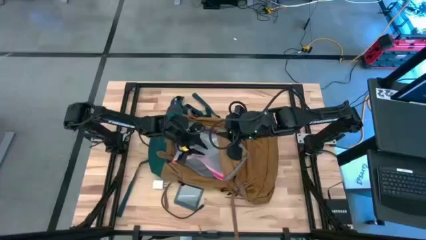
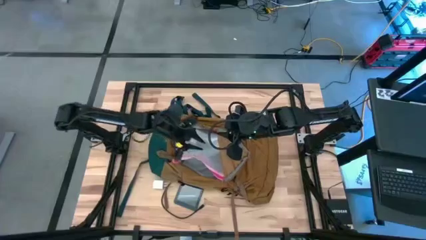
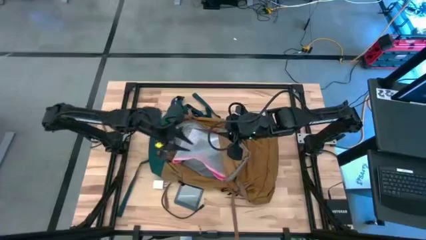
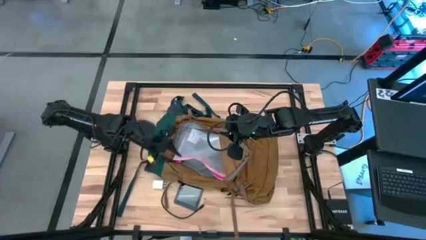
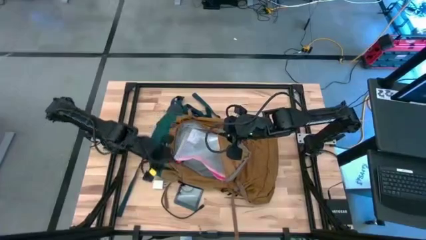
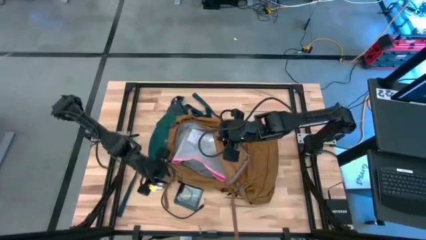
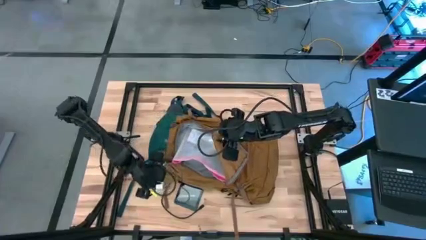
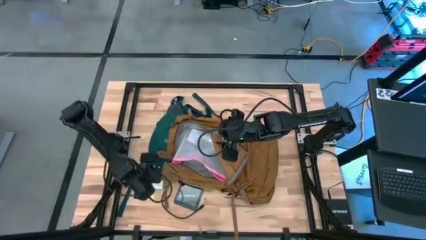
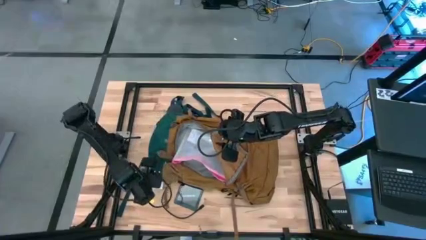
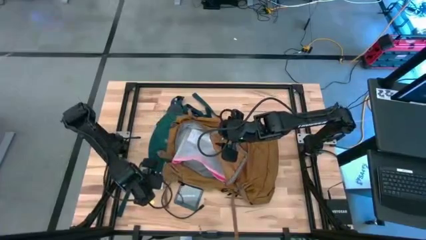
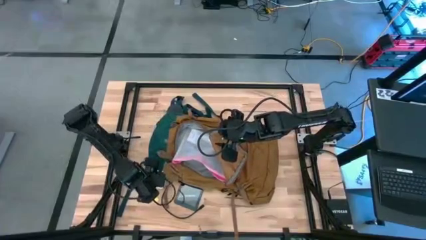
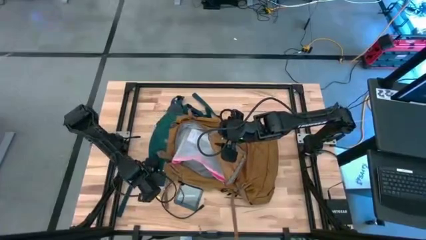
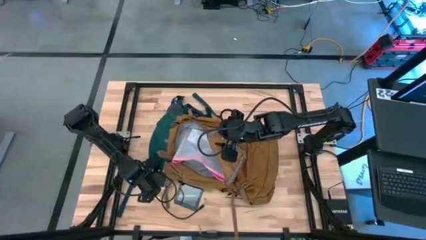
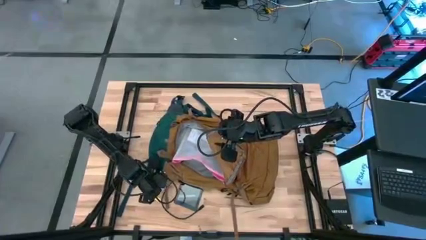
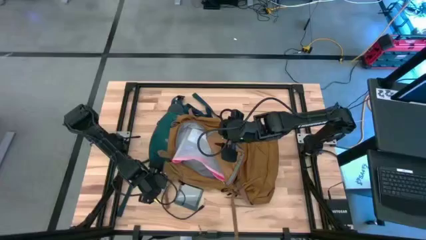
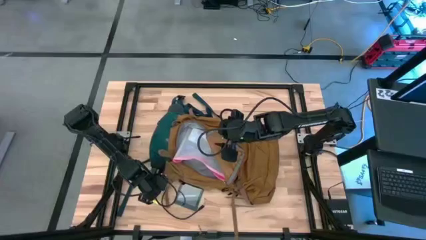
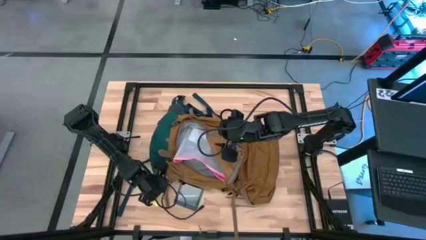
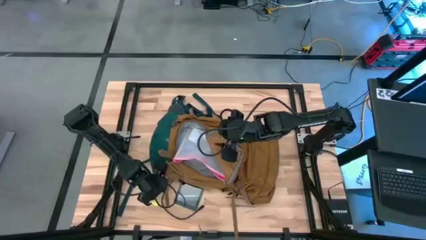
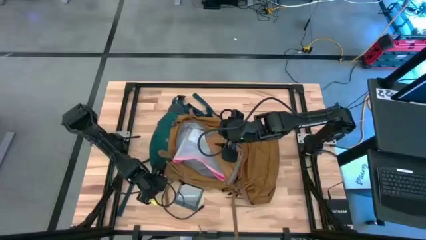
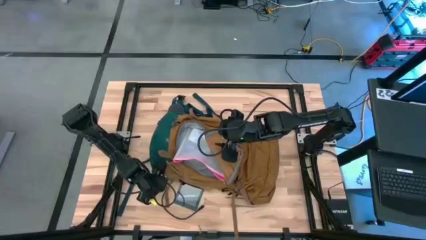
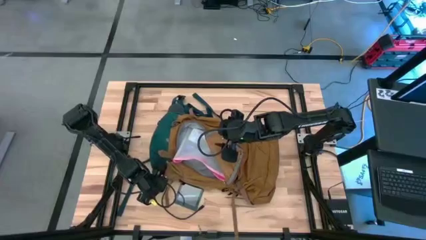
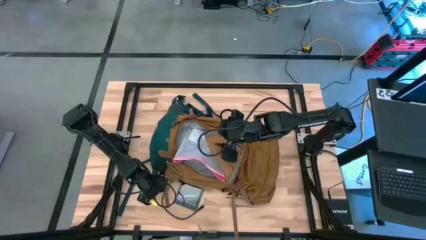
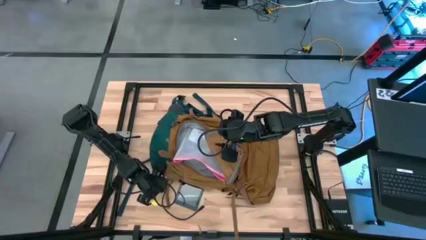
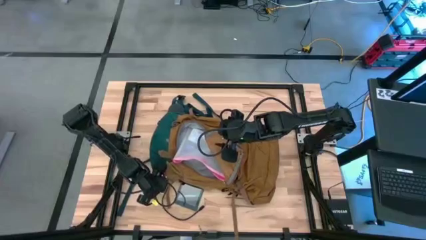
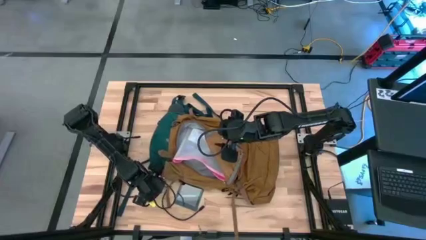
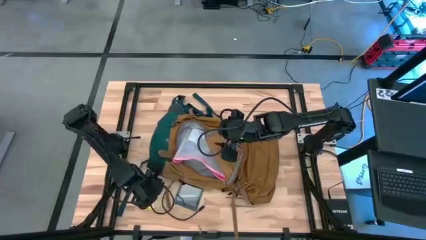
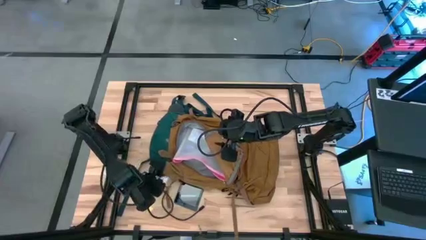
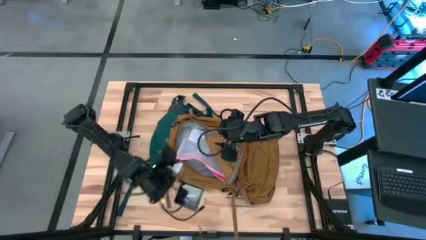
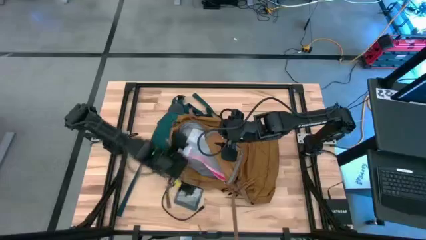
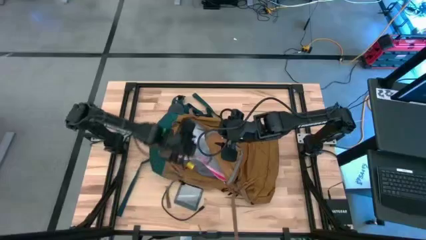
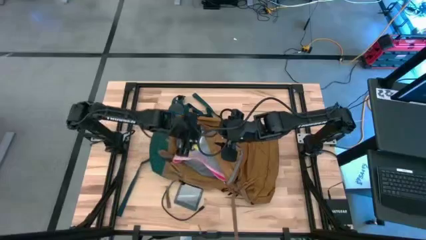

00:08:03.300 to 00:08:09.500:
Task: Unpack backpack
Put the charger adapter into the brown backpack

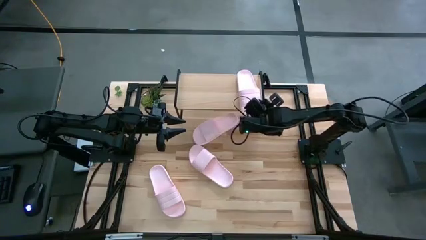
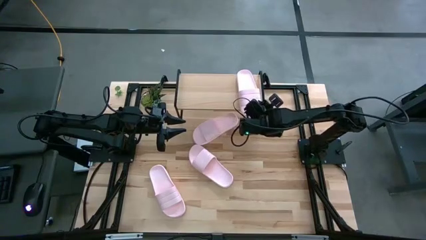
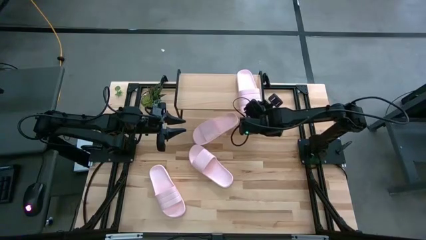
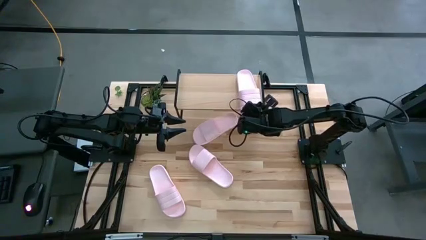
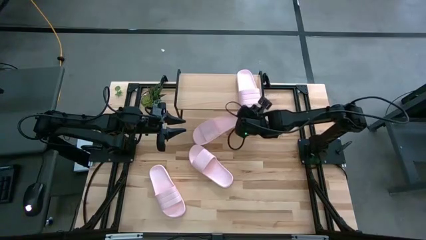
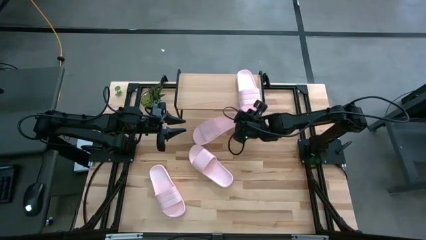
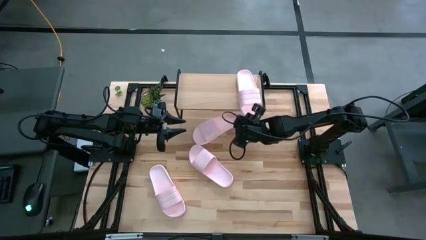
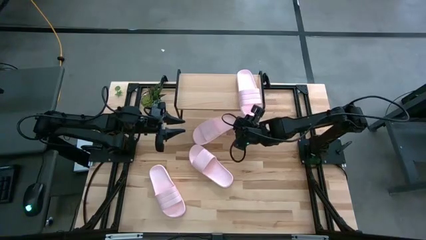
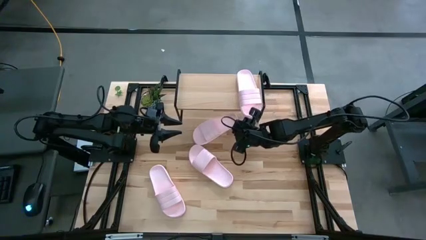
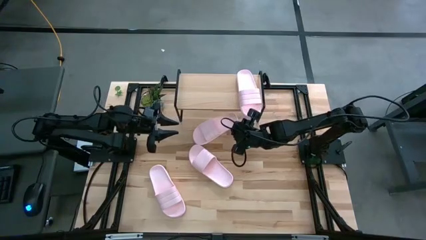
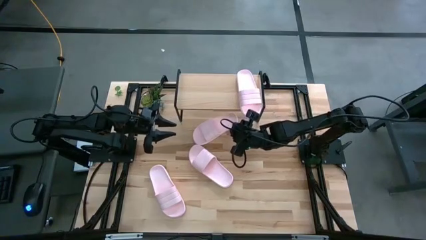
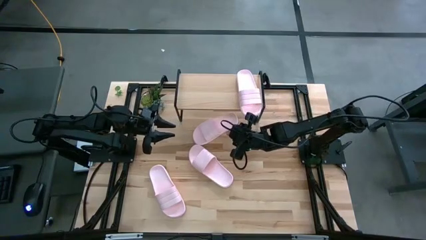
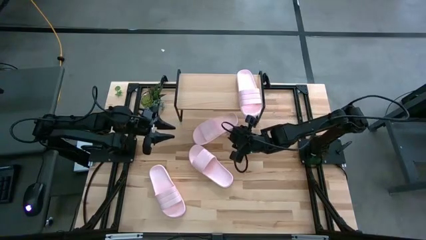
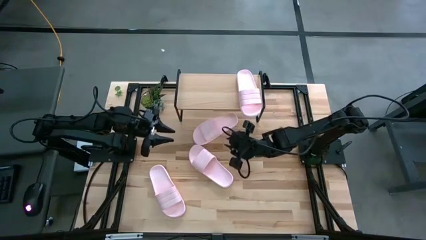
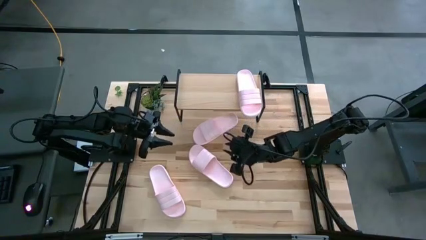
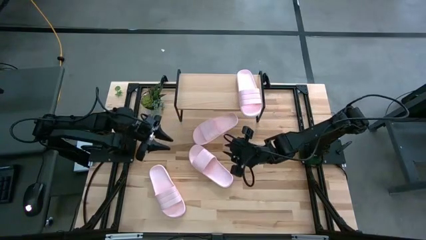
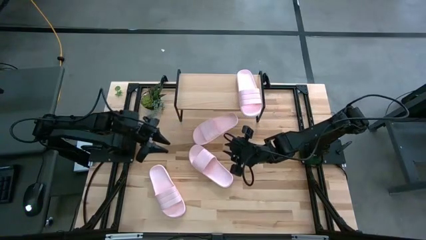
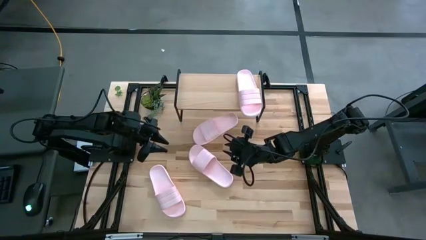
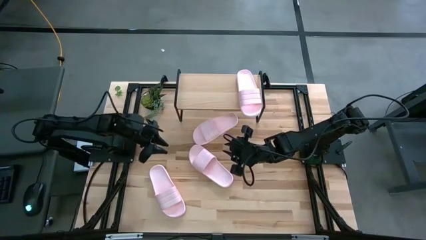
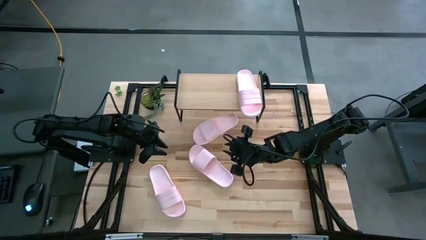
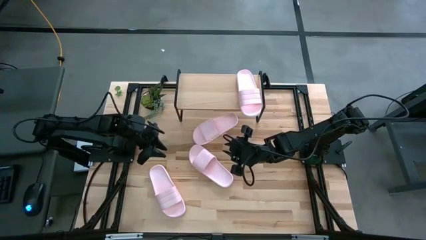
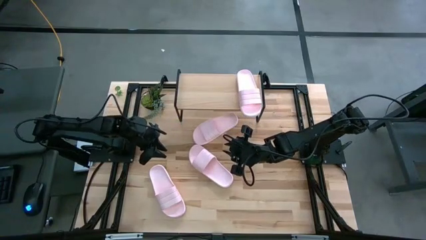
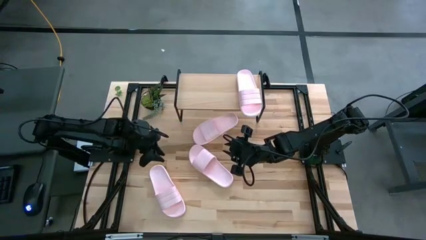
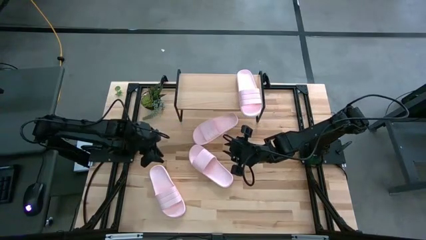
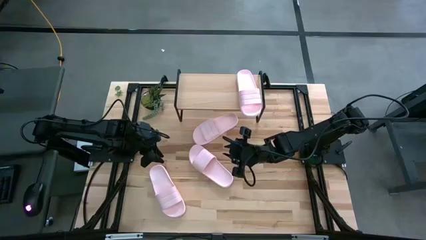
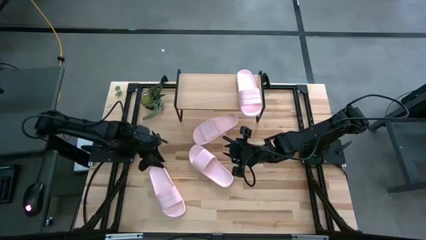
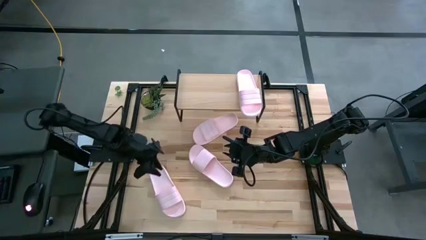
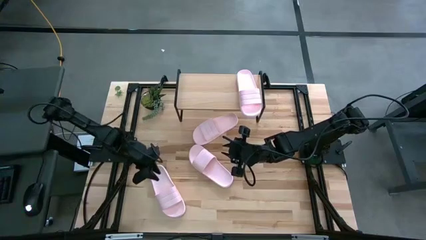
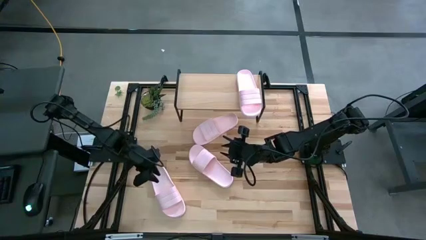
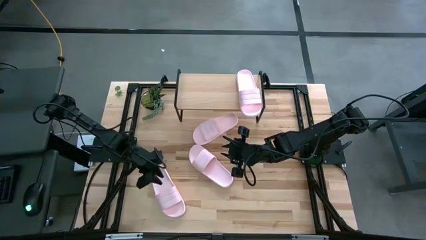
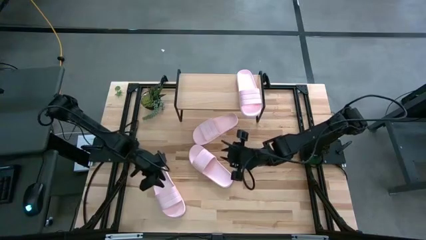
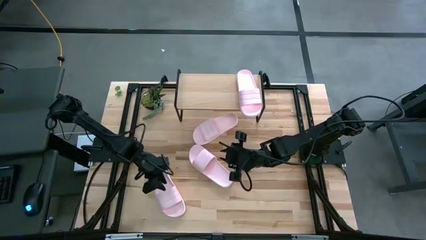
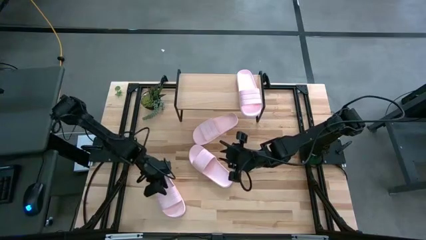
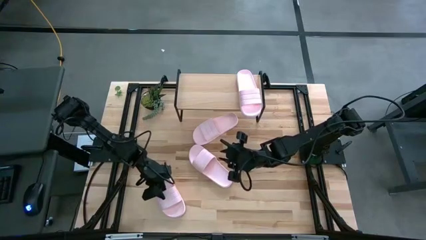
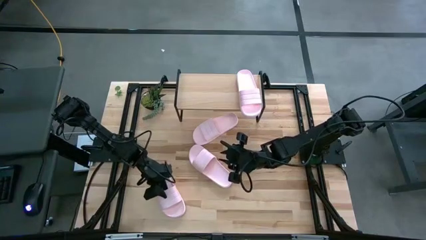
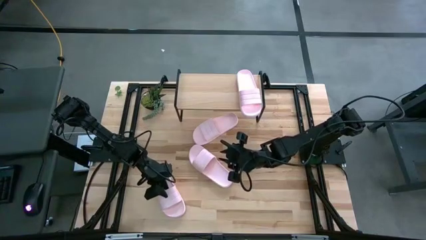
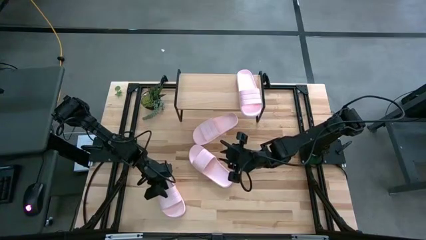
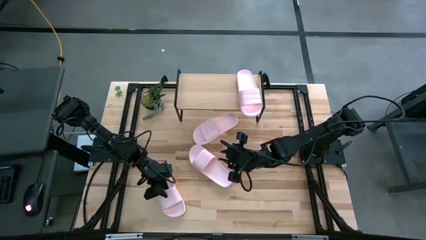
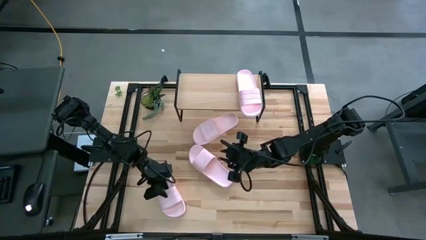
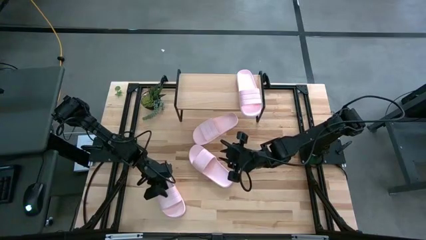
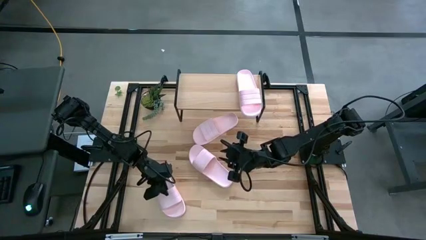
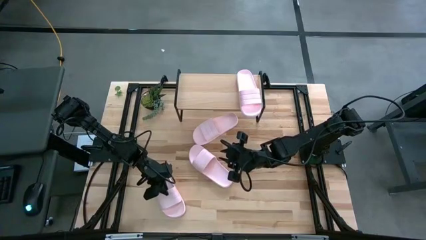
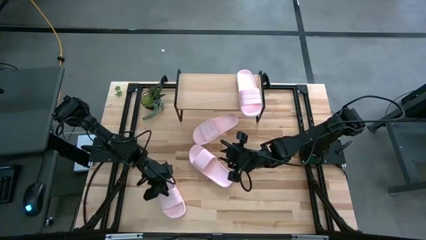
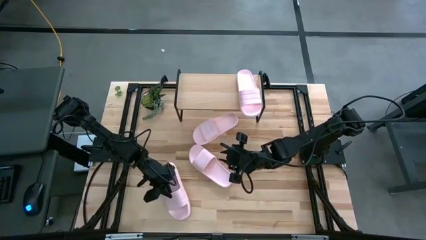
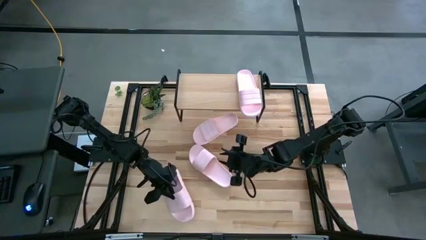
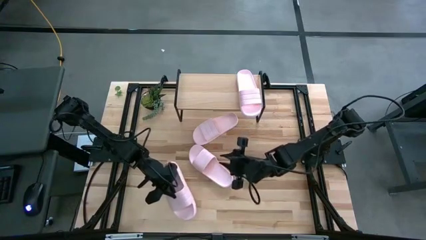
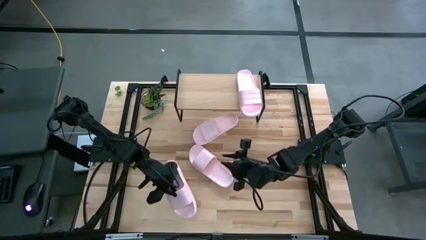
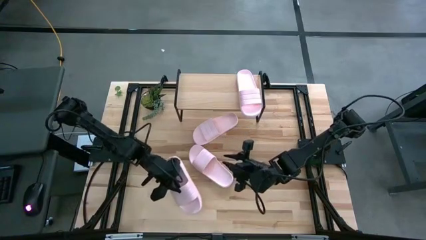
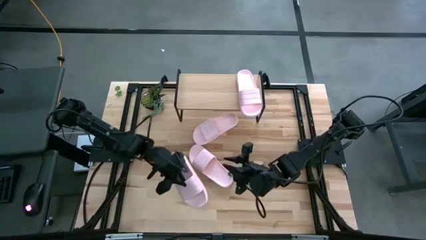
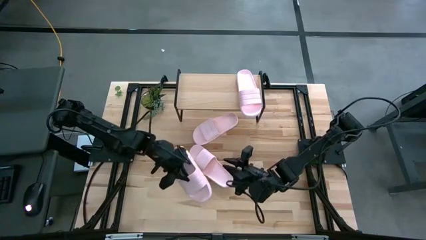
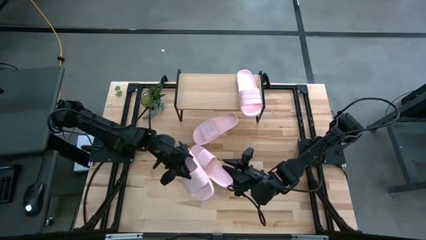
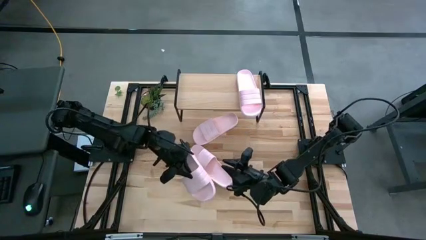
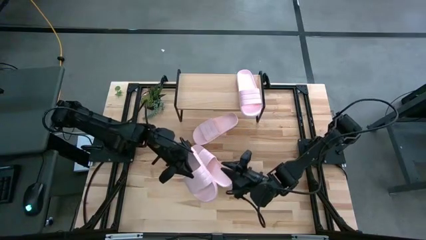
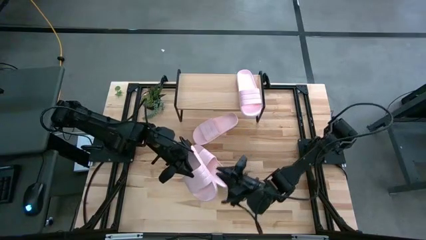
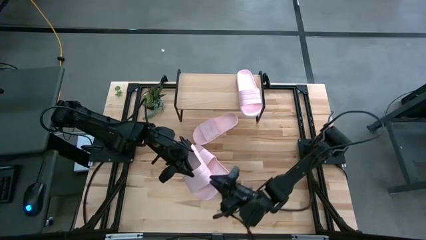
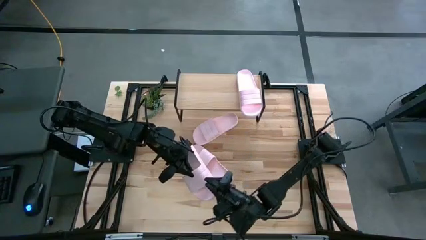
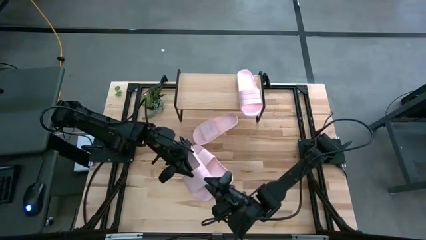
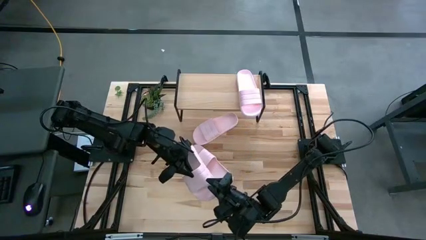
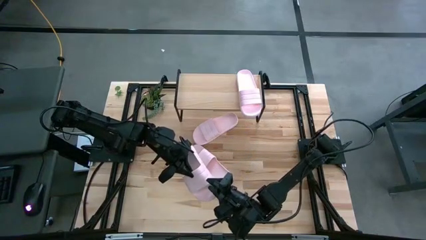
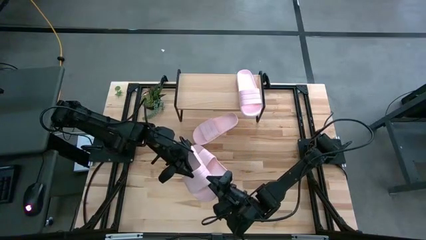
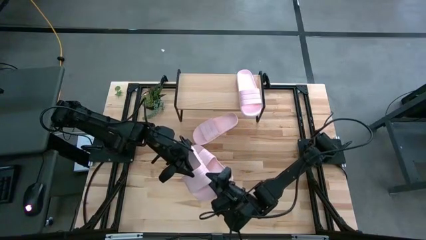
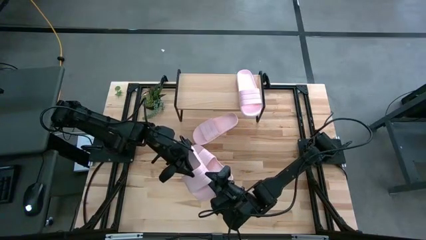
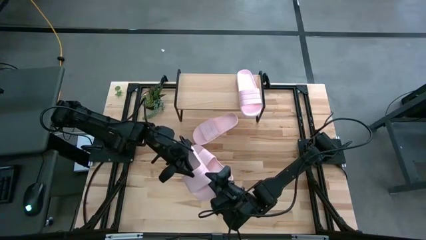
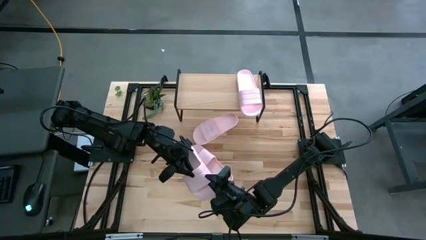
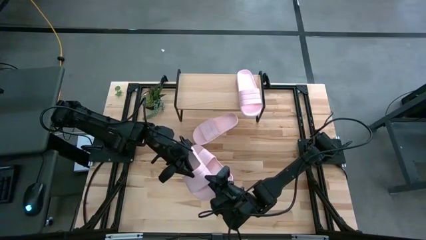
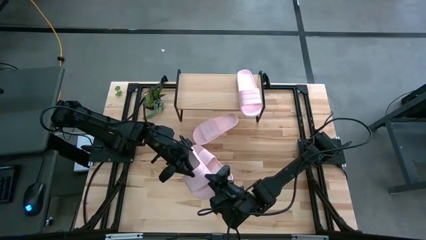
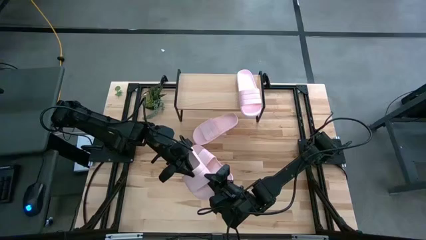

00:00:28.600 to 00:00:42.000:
Task: Pick and place slides into the shelf
Put the pink slide on the shelf
